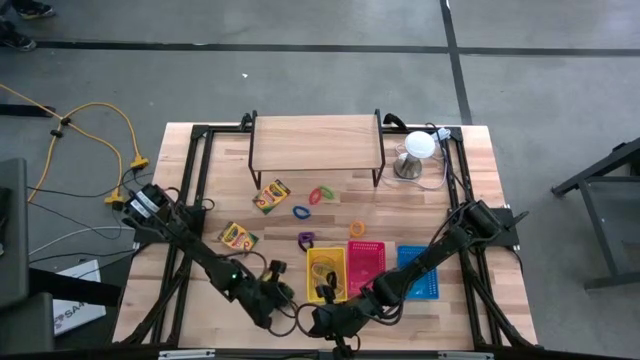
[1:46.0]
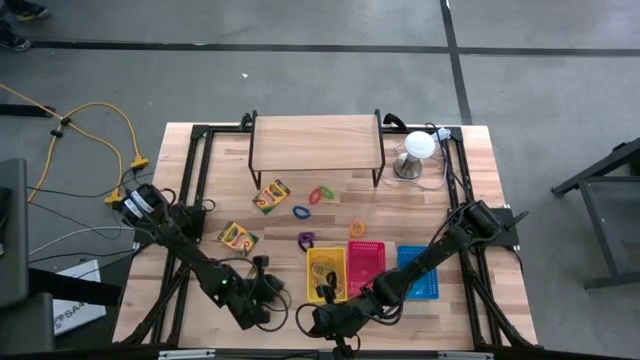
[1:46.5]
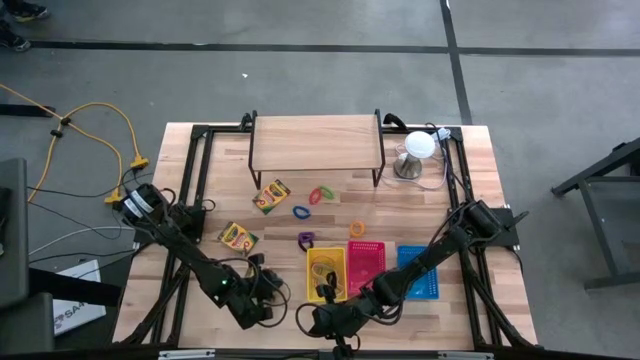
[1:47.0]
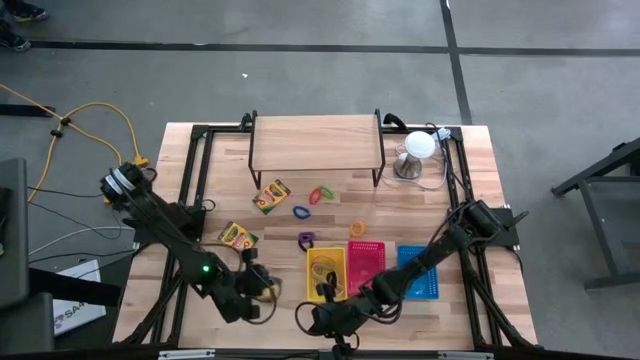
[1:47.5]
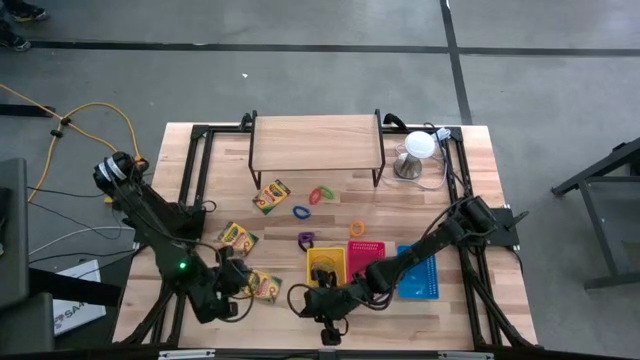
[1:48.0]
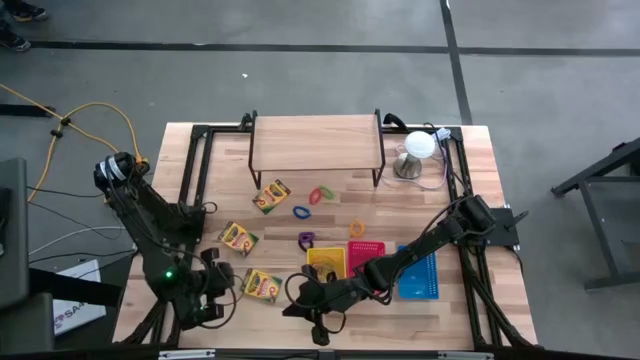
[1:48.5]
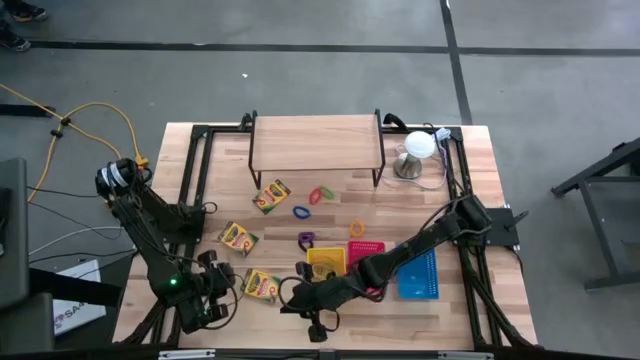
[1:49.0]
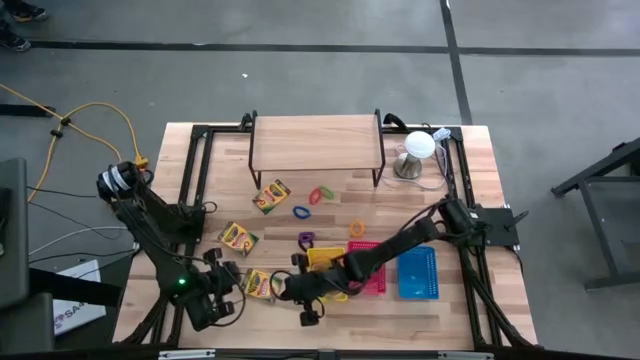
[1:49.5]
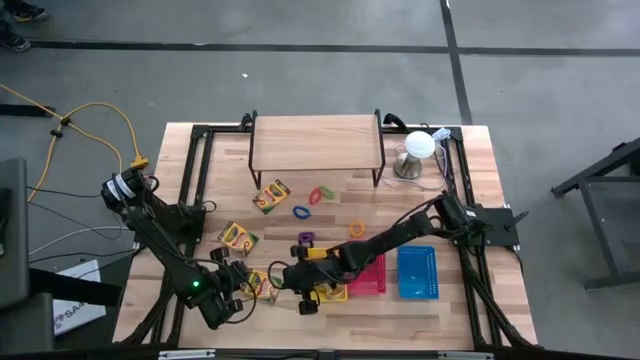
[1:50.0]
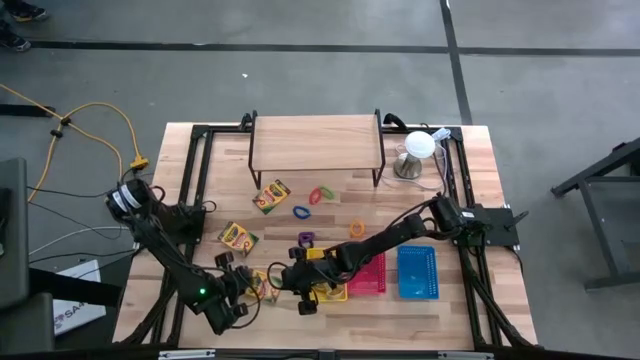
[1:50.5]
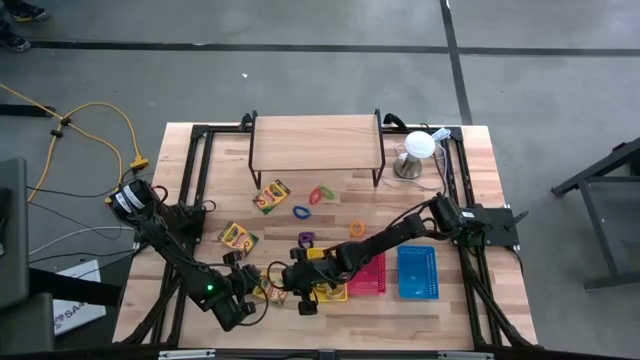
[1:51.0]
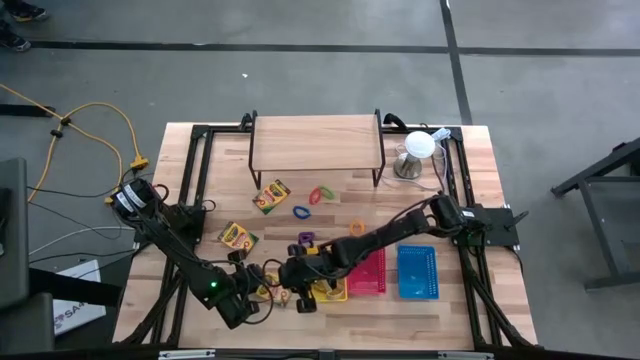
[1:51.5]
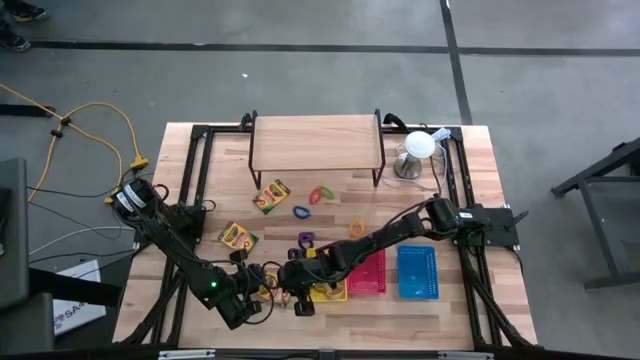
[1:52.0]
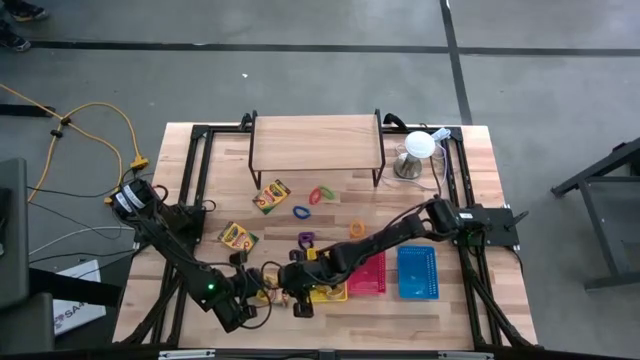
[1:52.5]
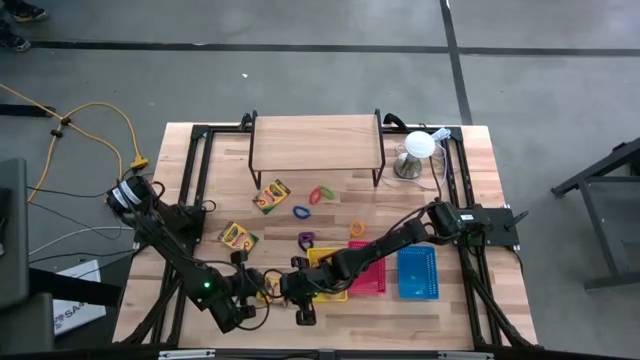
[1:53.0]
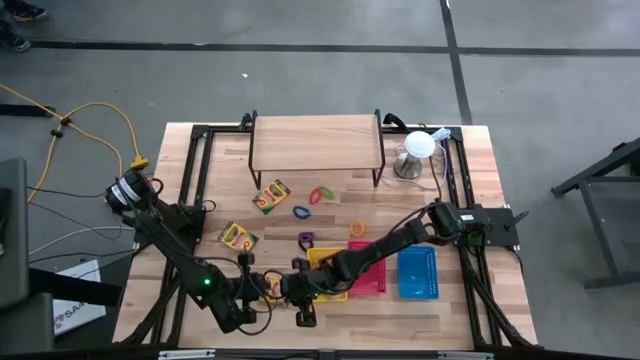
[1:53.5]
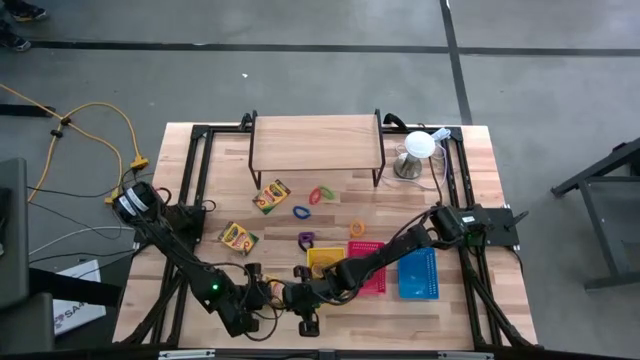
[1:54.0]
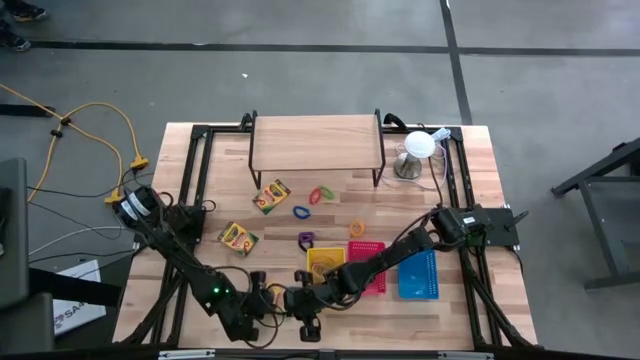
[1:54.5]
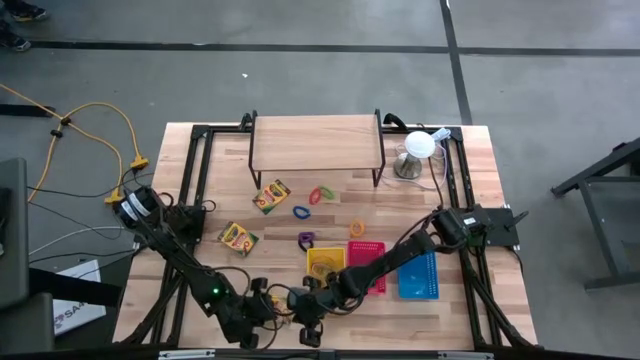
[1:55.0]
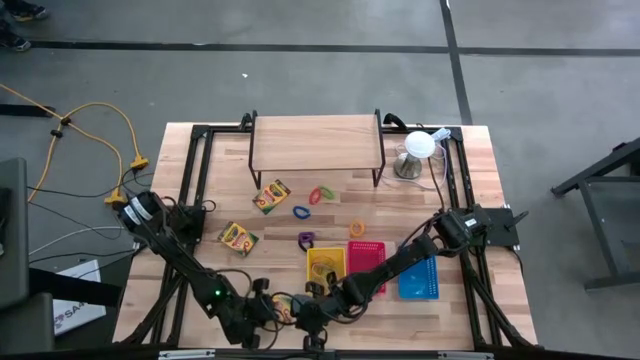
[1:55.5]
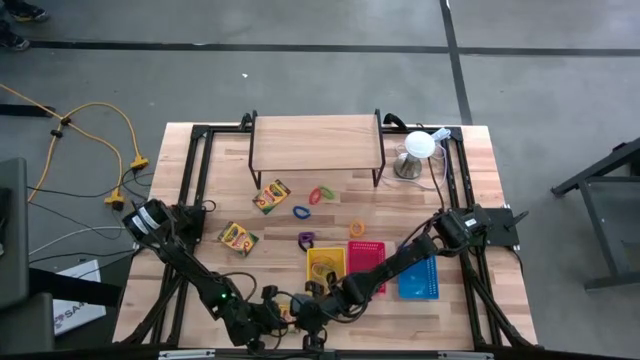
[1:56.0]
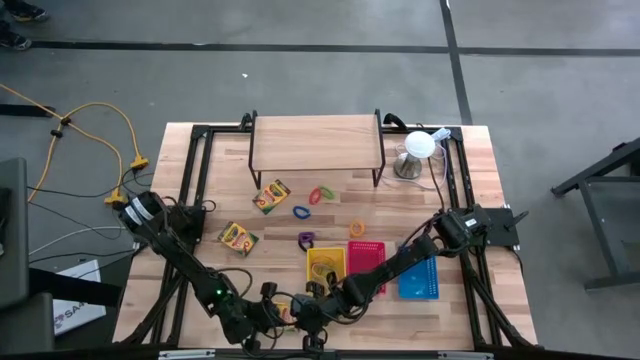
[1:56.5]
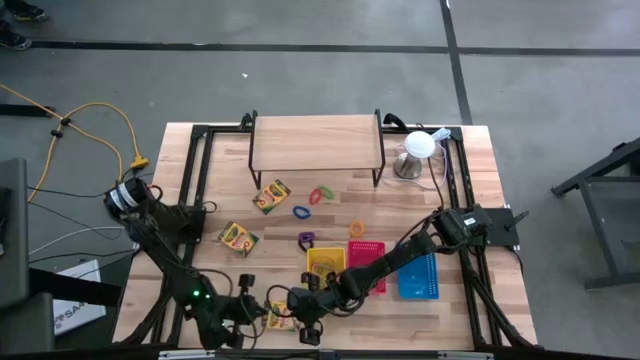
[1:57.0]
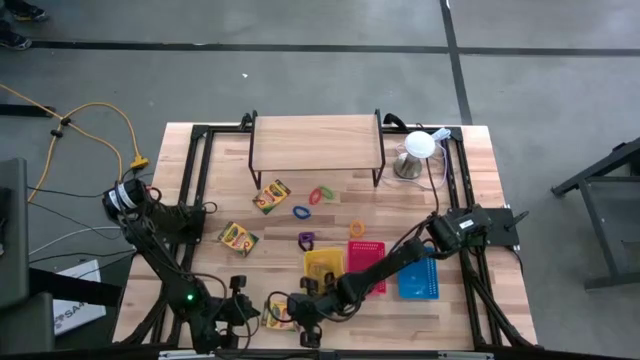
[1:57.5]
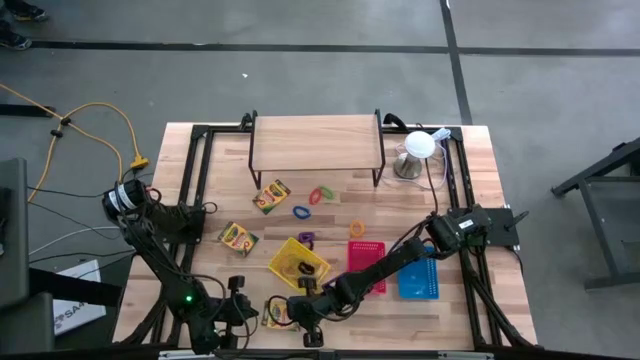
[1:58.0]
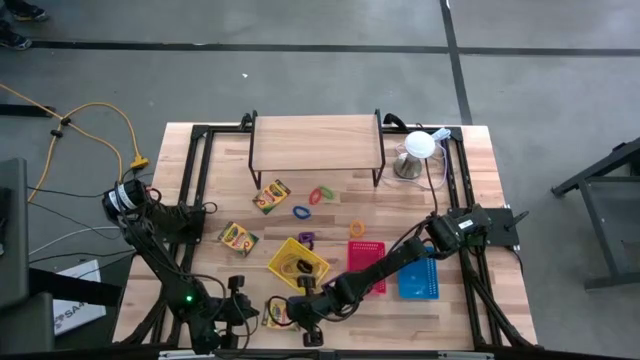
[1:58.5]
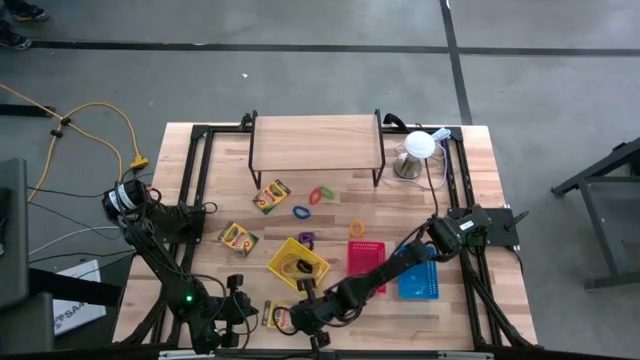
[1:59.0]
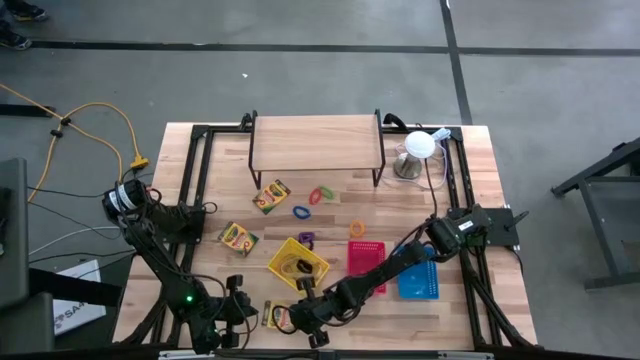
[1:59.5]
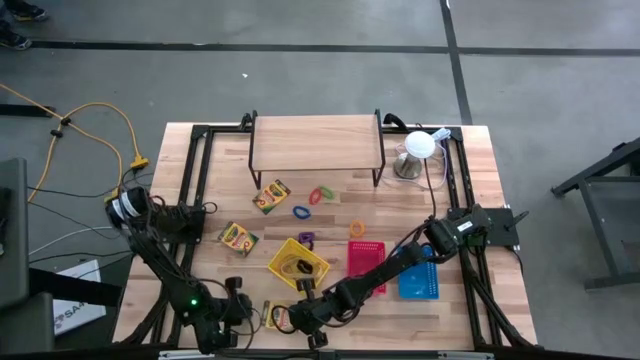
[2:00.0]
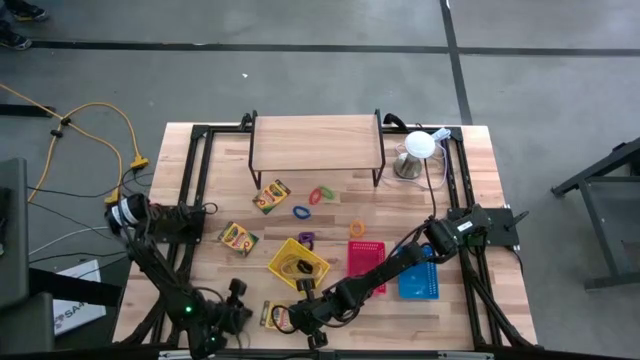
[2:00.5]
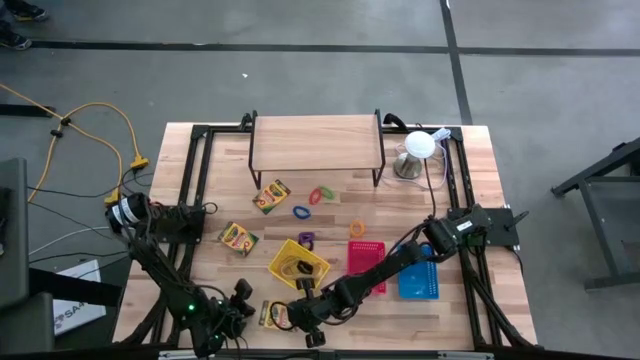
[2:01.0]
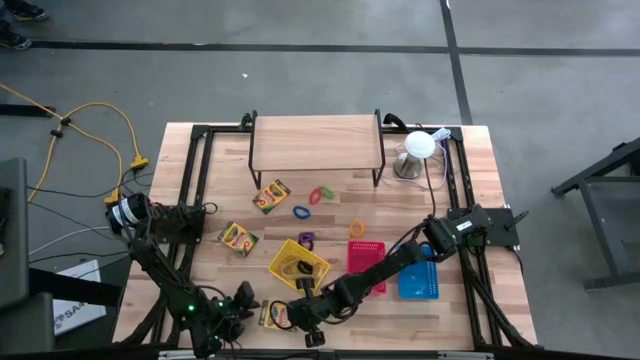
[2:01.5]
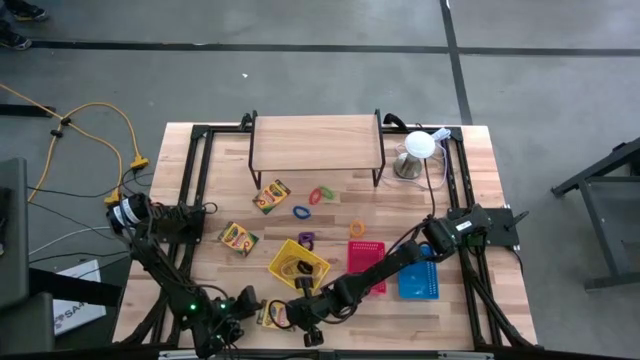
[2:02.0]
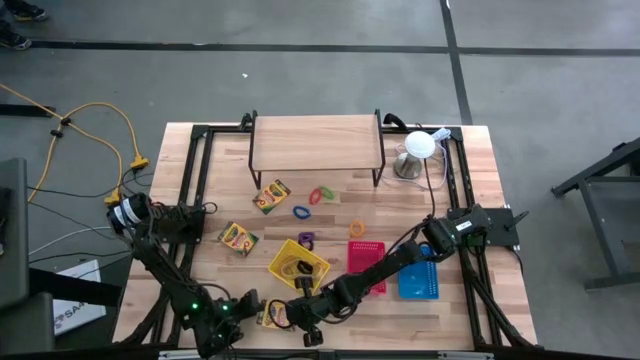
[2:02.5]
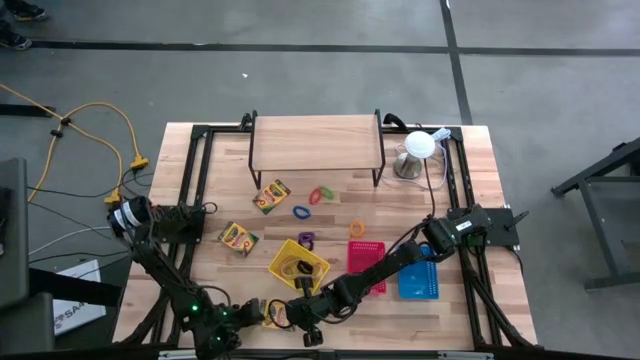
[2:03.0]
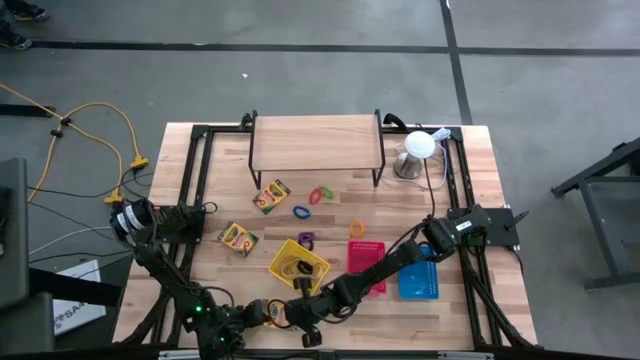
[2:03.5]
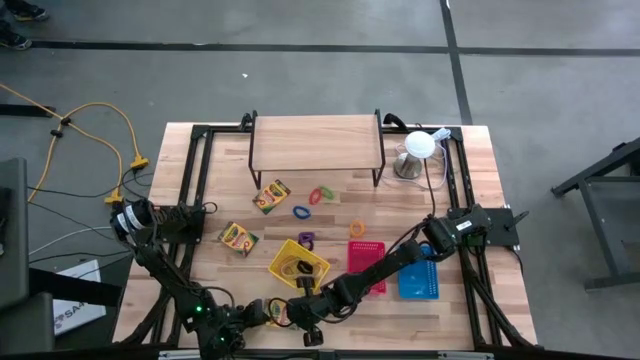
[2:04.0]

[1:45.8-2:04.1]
Task: Pick & Place Office Desk Supplies
Put the bottom crayon box into the red bin

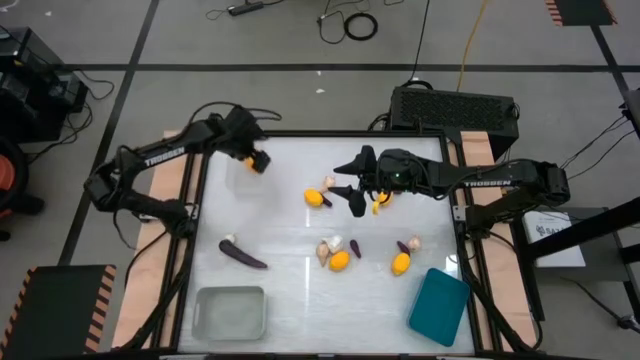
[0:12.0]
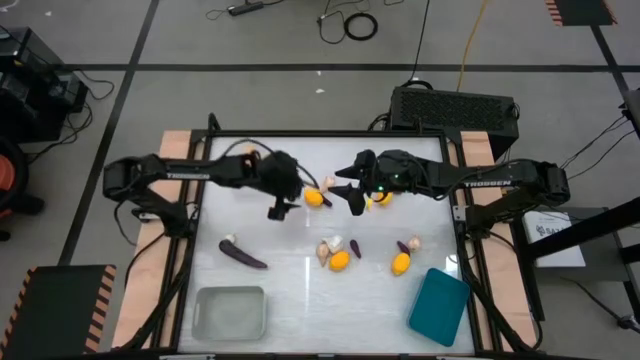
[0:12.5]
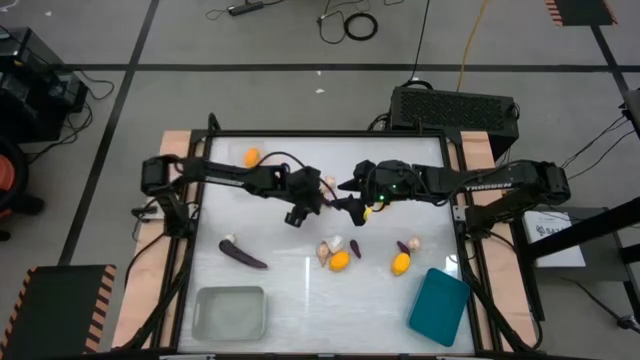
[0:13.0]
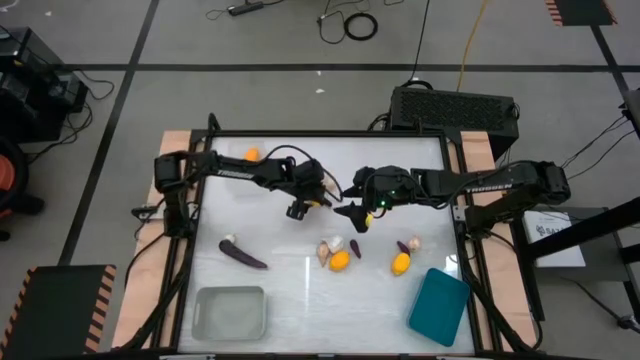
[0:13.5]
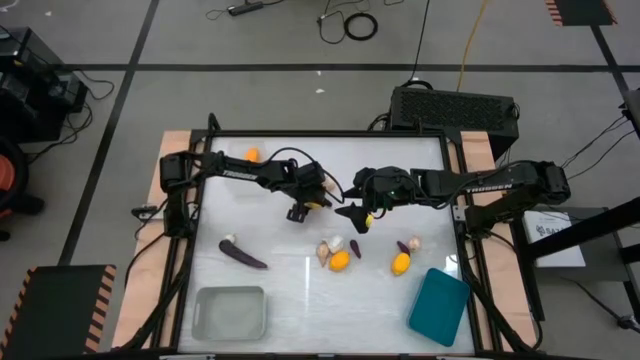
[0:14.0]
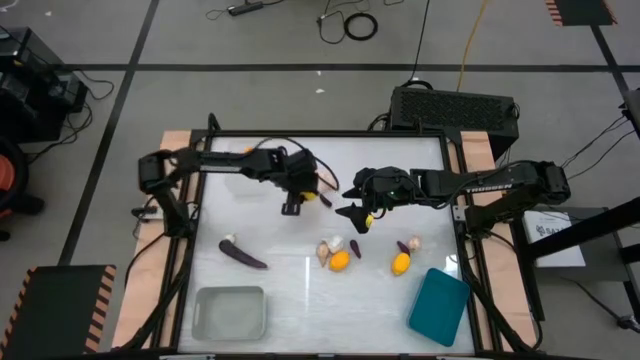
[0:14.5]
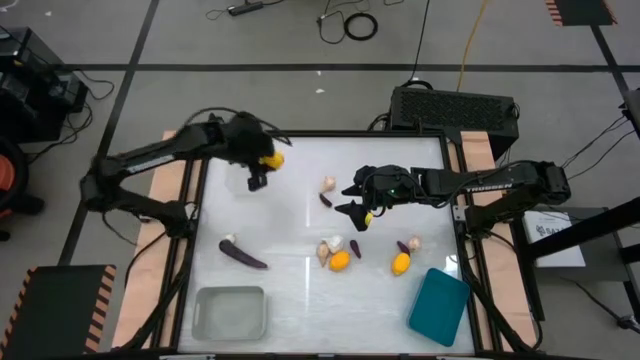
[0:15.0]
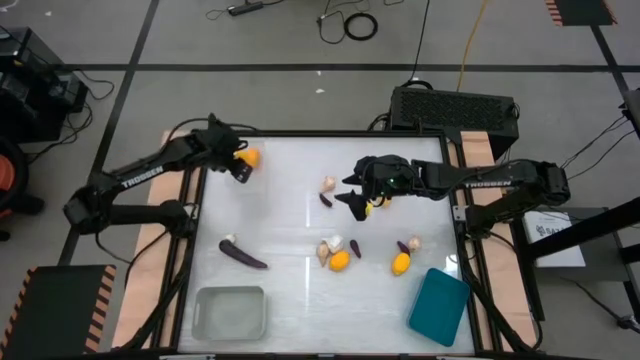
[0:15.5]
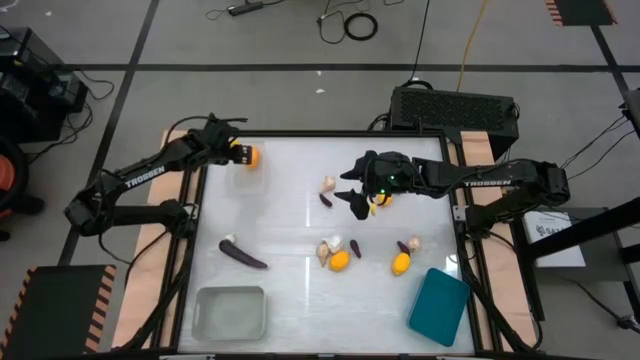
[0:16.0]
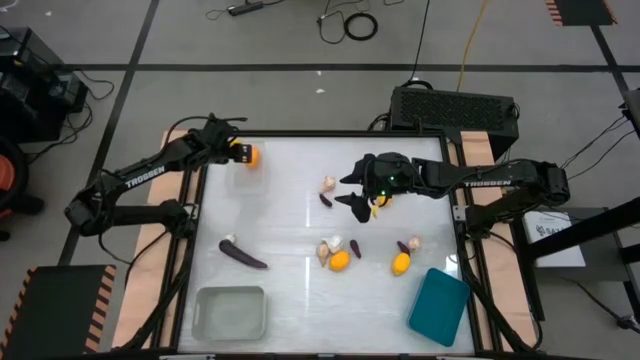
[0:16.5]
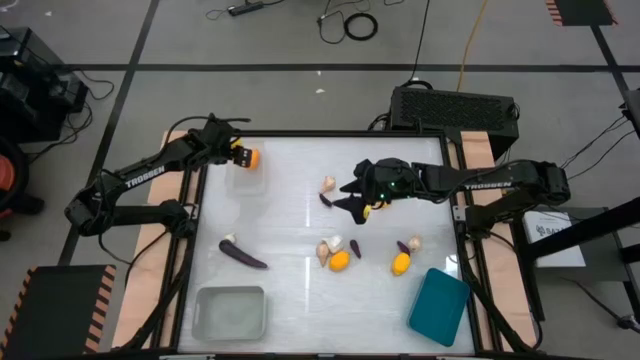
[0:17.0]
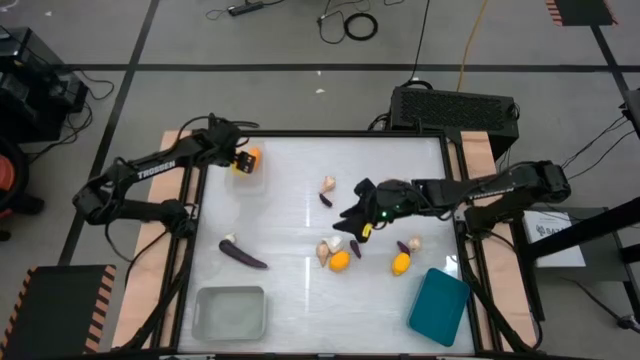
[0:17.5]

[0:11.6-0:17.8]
Task: Sort produce into baskets
Put the yellow lemon into the white bin
